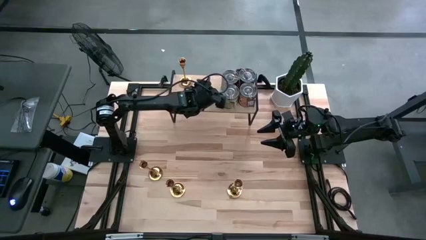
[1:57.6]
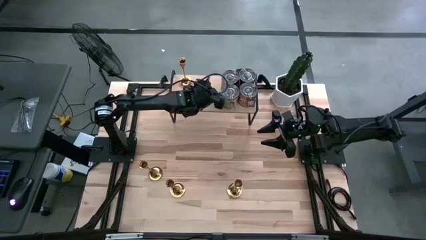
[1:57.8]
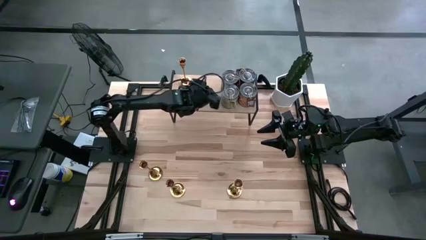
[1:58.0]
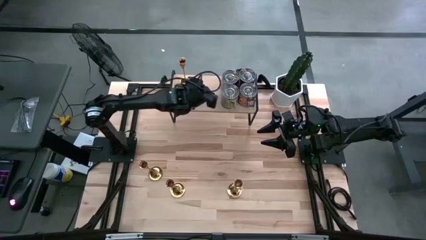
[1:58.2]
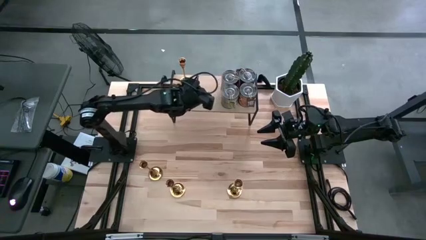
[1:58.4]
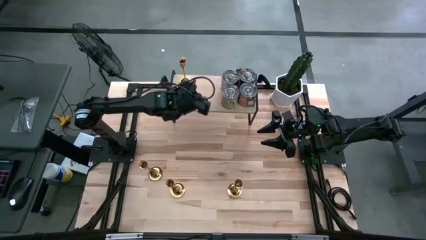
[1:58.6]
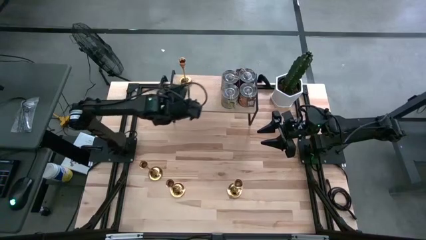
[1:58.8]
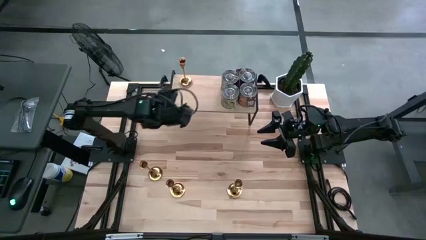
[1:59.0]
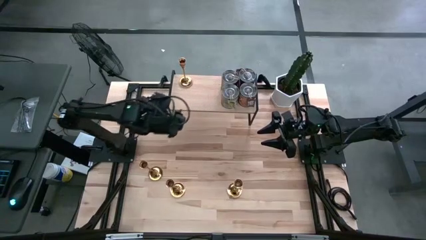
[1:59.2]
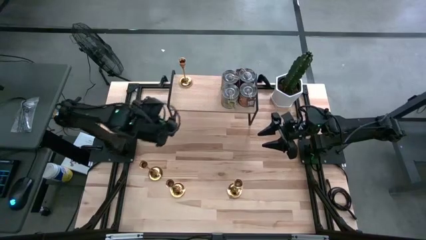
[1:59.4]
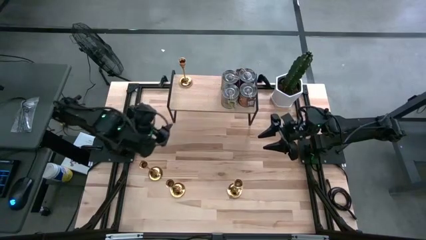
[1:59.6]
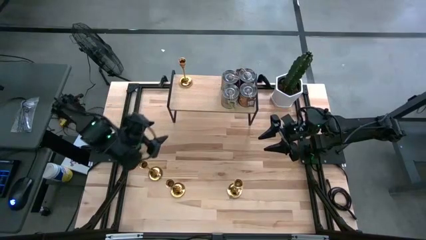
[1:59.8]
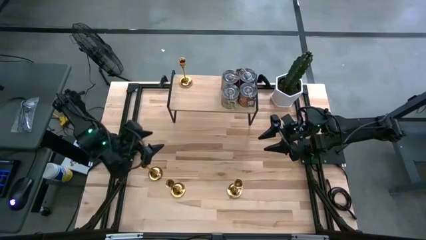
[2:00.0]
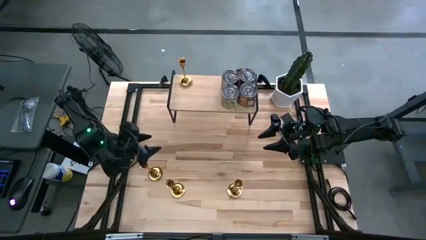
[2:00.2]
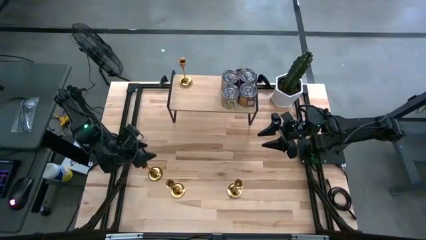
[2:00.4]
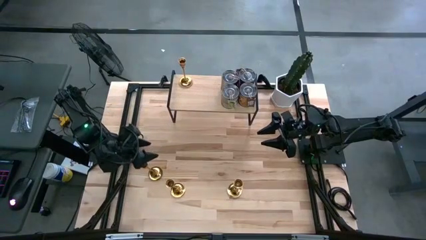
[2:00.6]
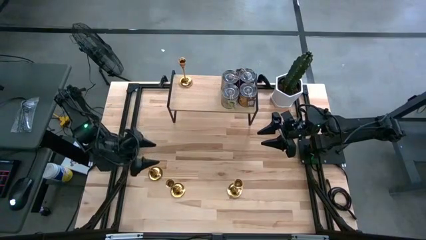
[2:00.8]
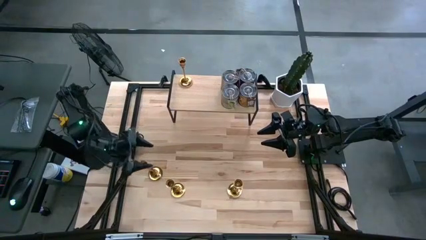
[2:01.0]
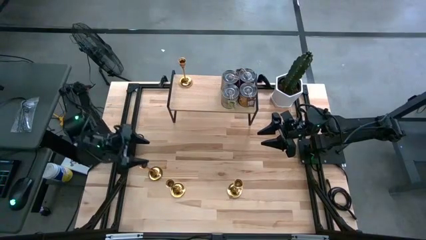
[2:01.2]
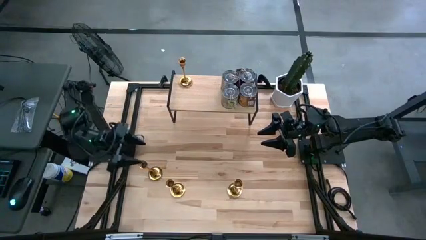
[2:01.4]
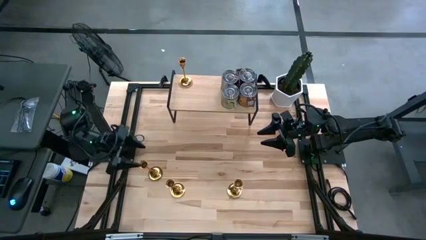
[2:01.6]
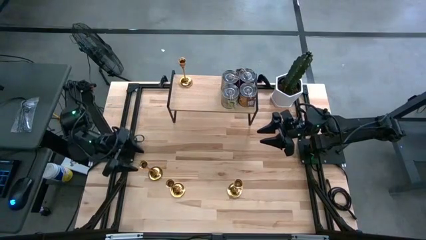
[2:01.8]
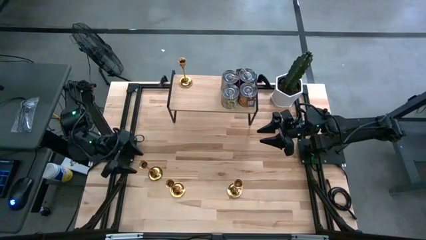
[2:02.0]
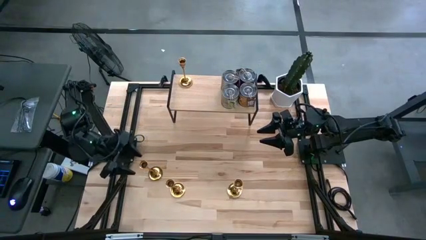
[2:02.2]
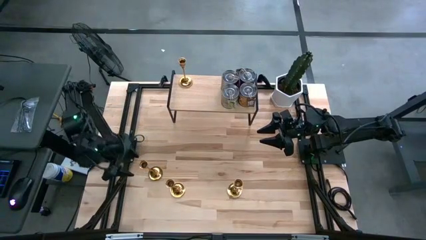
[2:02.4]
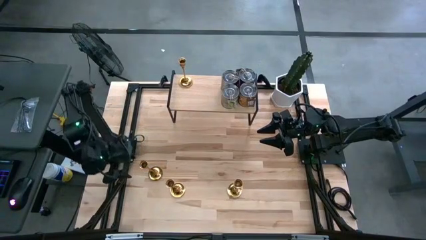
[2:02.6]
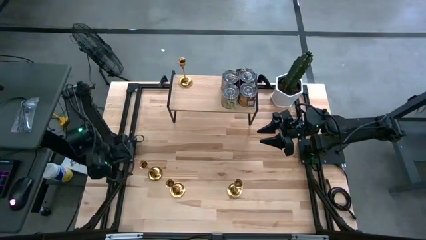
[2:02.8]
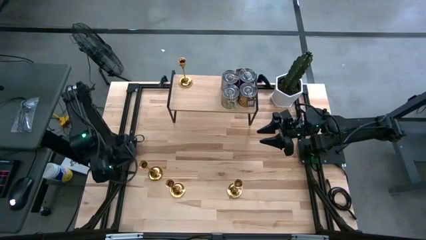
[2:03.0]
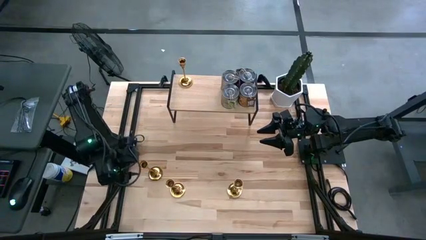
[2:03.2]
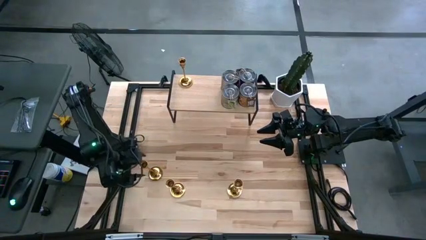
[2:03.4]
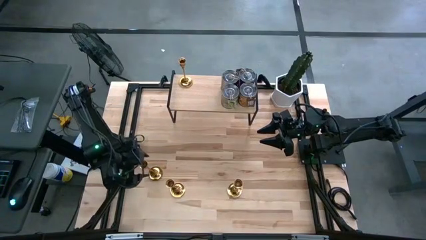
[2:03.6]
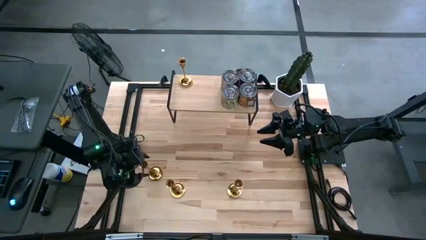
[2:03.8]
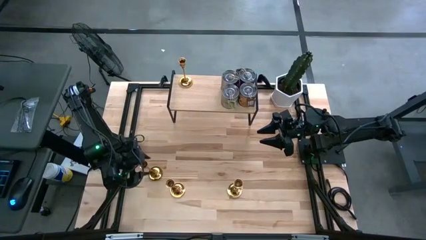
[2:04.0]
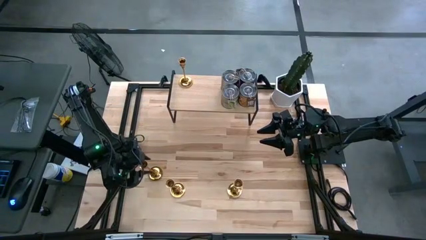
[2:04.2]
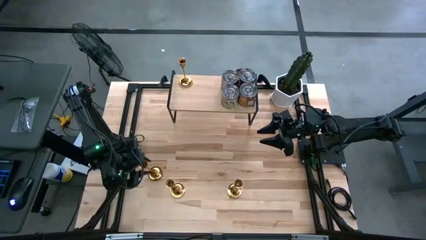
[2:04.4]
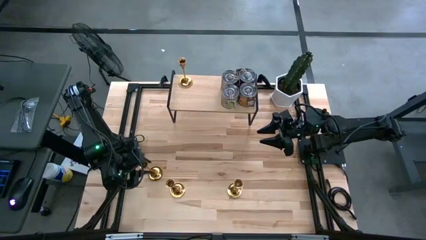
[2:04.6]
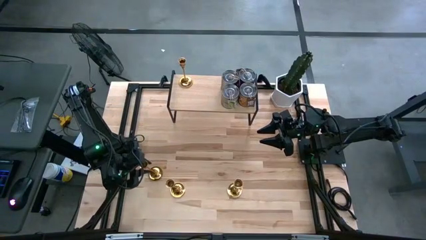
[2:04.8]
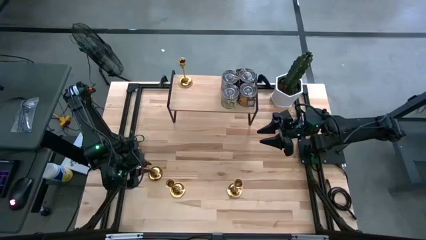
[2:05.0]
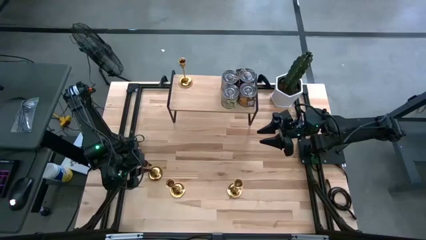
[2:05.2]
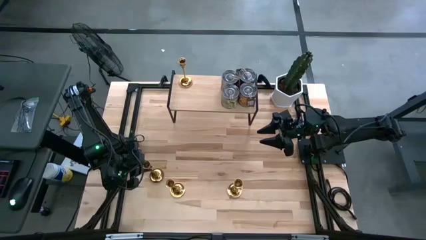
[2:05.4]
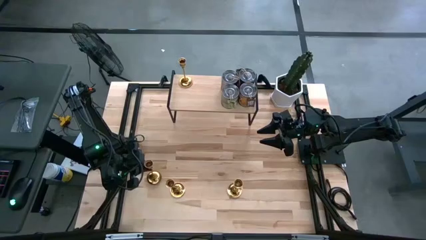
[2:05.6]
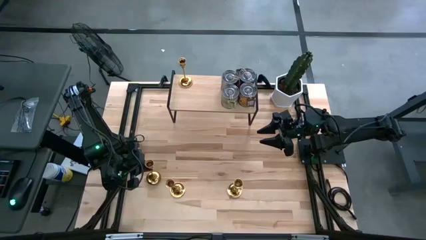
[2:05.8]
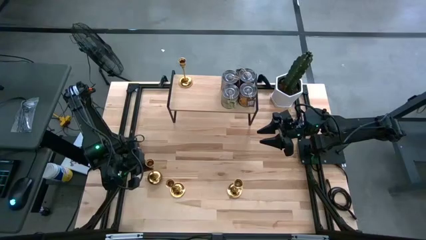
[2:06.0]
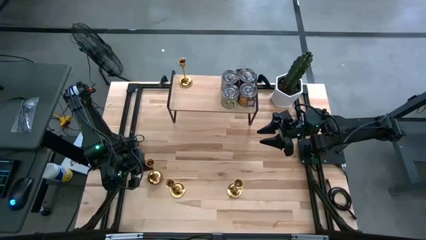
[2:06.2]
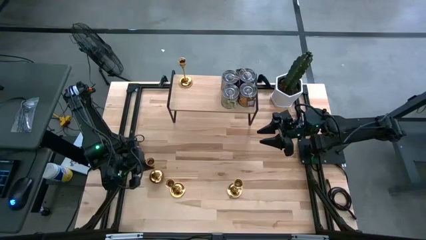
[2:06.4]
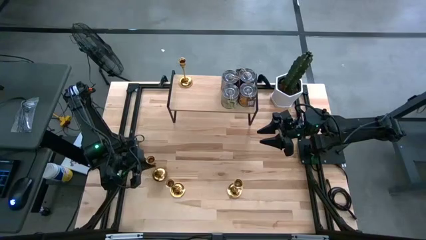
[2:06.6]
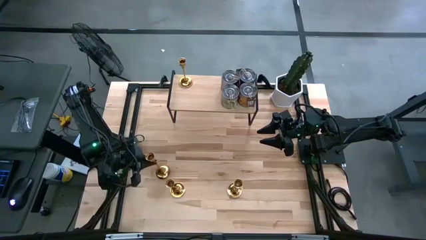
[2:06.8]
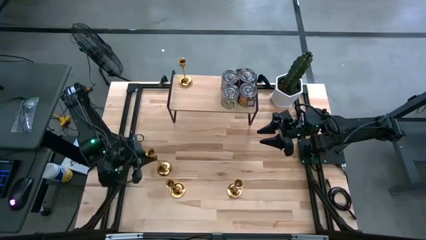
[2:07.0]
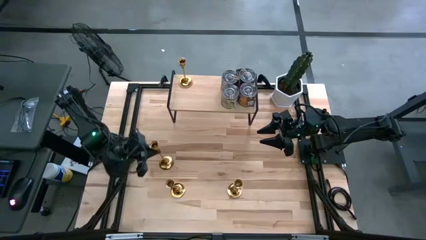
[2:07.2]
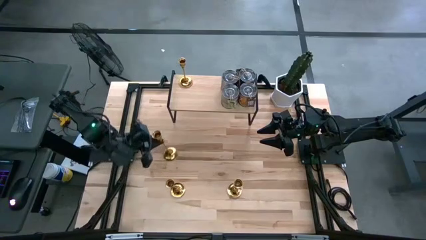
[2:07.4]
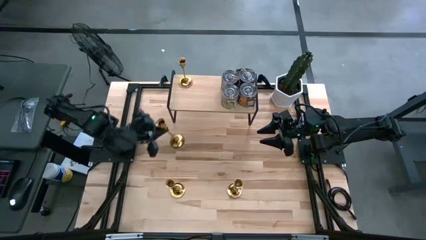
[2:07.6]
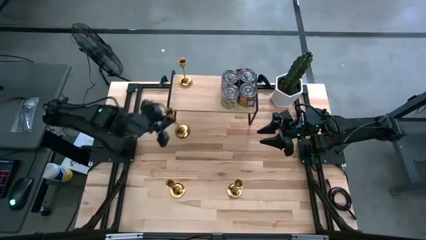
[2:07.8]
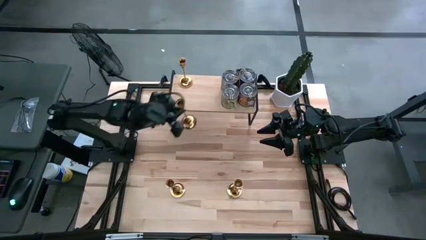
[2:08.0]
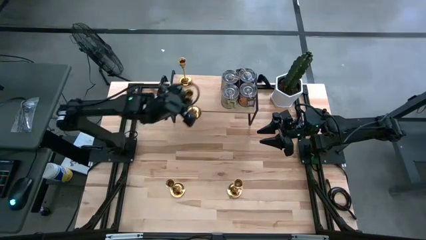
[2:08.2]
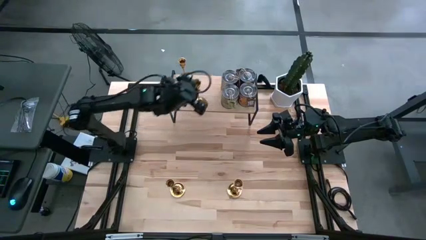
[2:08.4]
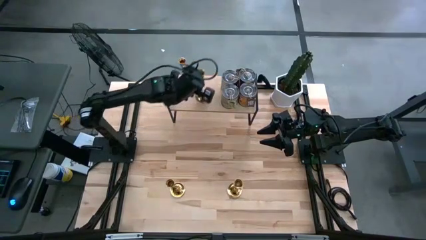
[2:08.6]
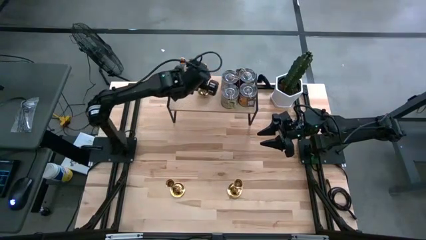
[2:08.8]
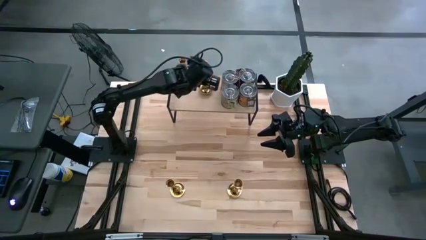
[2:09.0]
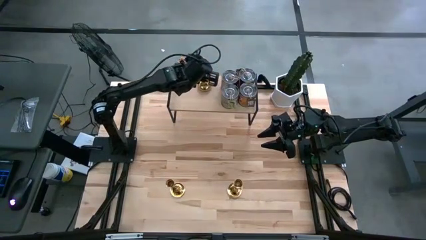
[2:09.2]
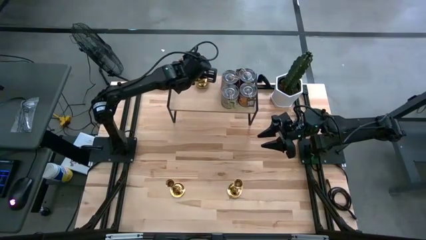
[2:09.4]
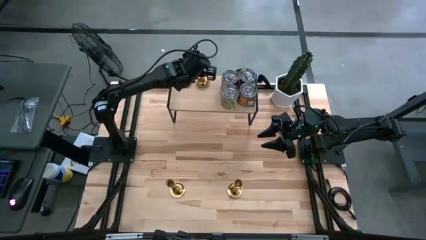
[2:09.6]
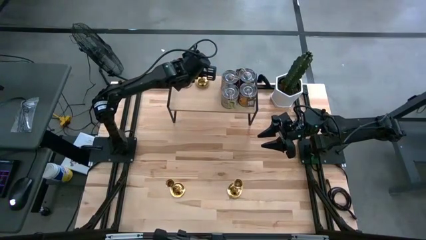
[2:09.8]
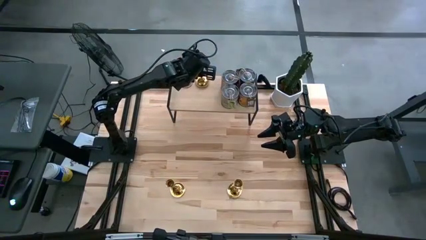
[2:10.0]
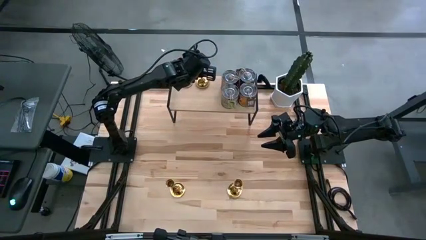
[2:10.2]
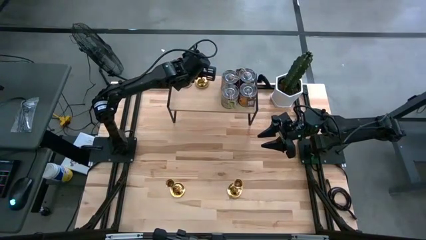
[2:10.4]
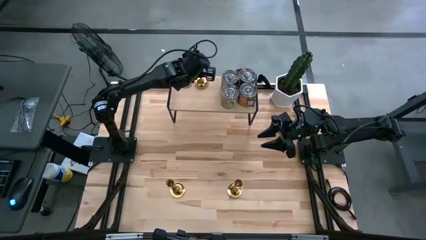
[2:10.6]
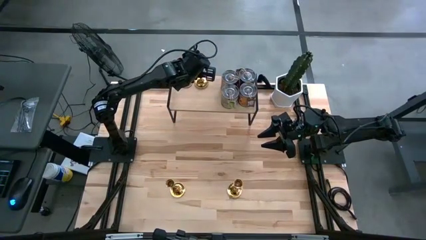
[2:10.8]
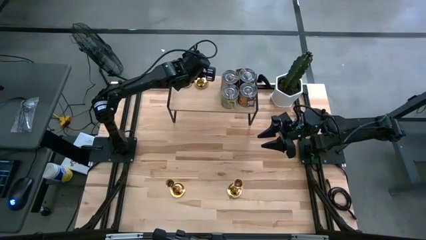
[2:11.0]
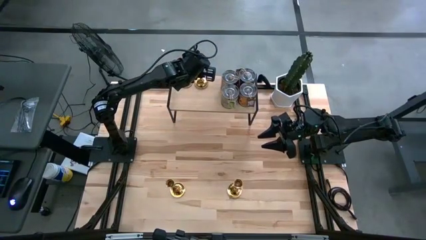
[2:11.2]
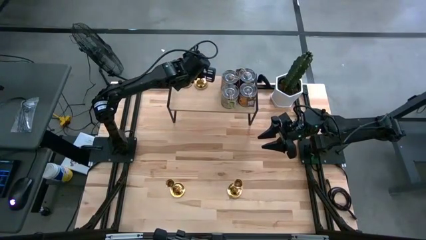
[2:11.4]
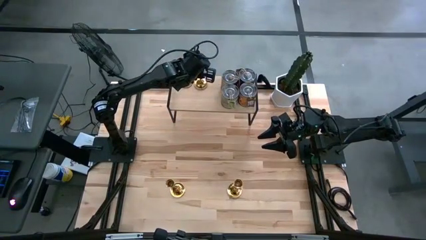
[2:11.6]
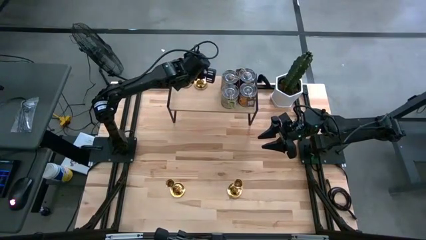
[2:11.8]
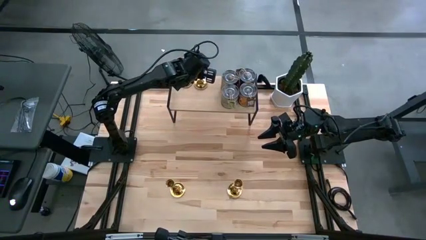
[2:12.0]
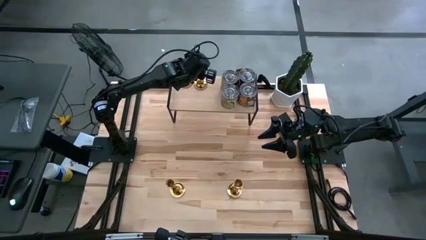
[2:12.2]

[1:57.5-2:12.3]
Task: Pick & Place candle stick holders
Put the gold candle holder on the shelf
